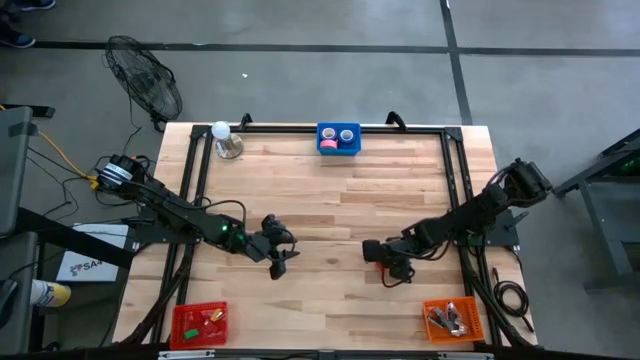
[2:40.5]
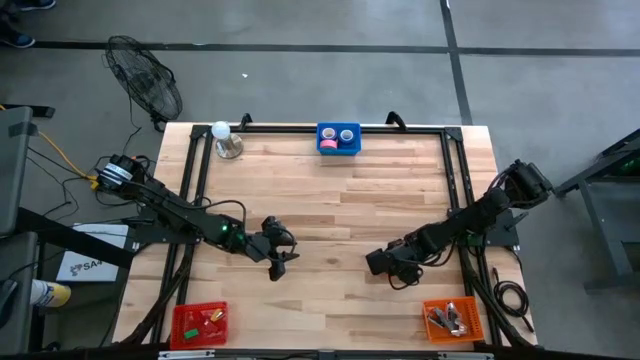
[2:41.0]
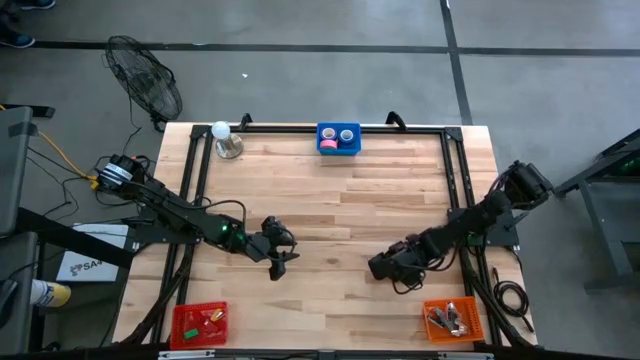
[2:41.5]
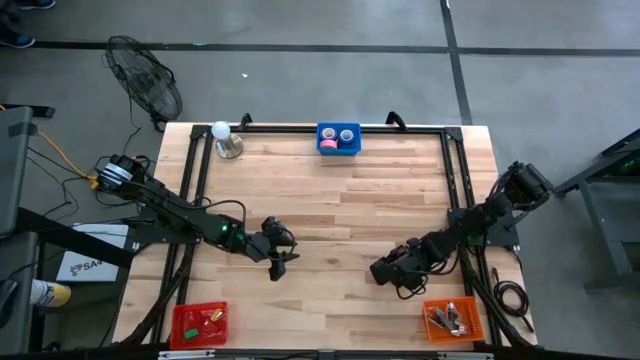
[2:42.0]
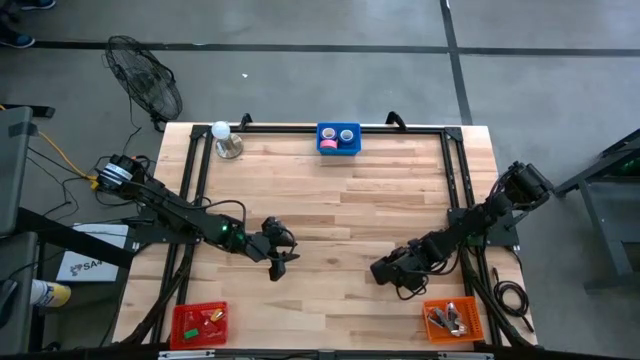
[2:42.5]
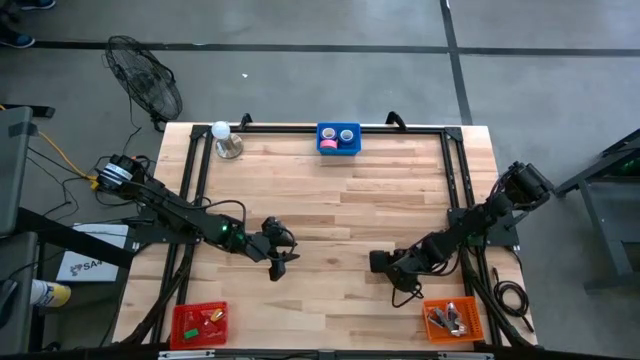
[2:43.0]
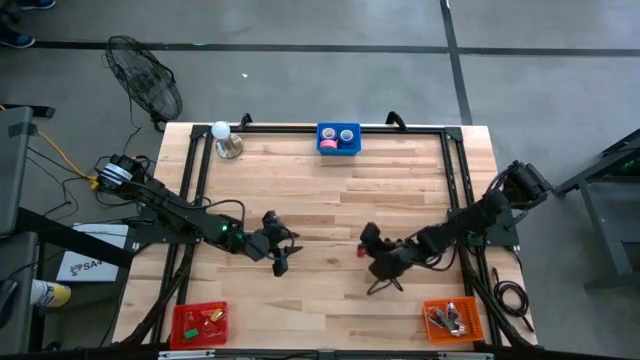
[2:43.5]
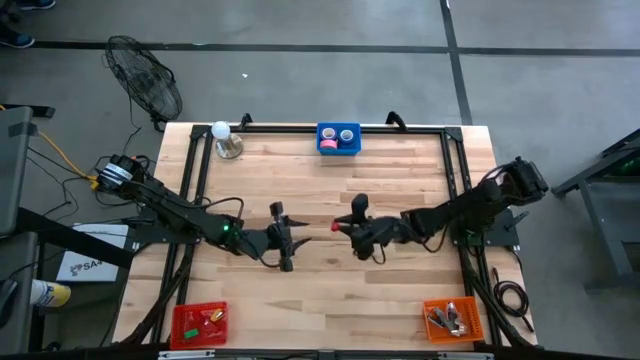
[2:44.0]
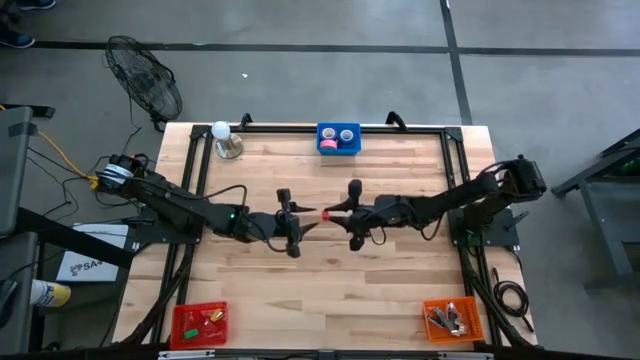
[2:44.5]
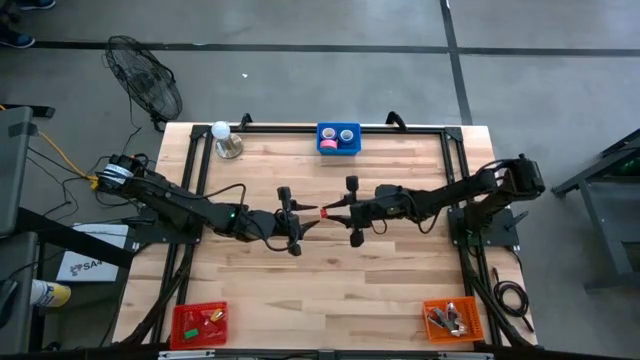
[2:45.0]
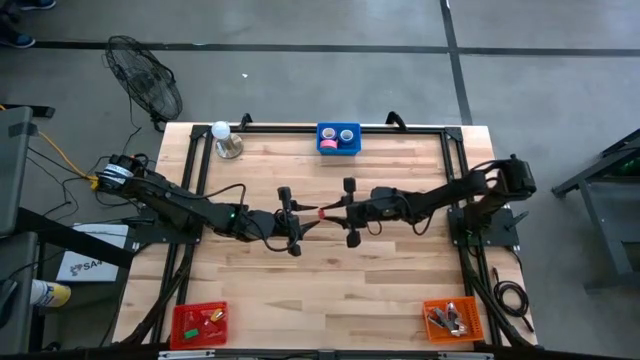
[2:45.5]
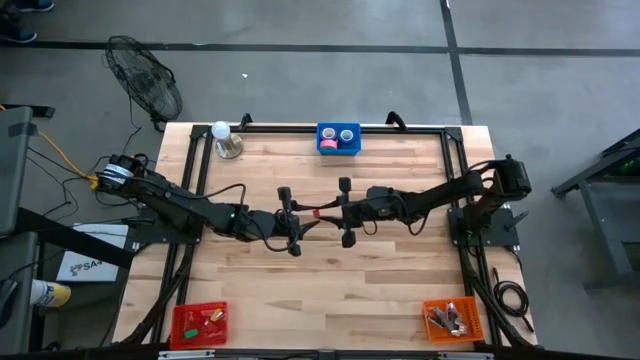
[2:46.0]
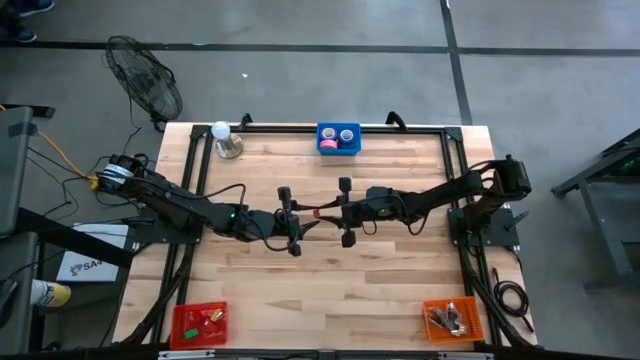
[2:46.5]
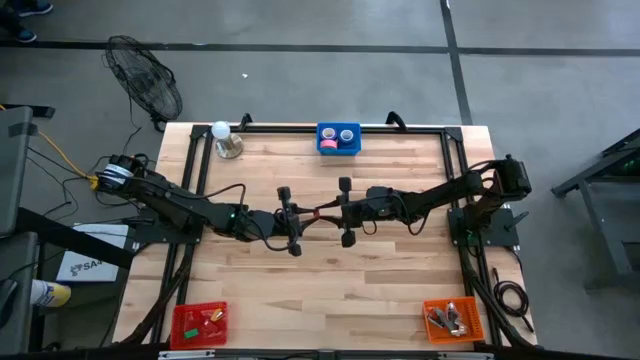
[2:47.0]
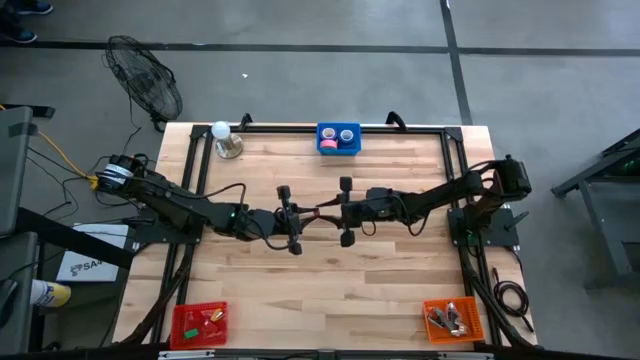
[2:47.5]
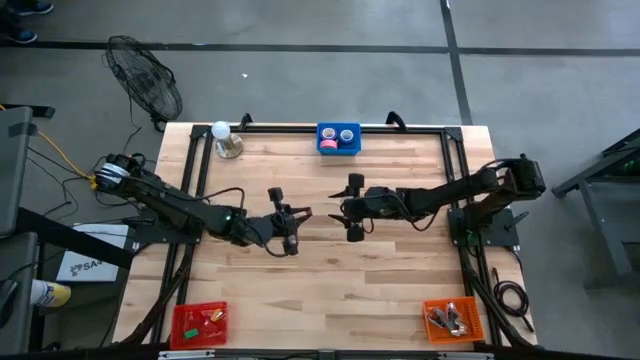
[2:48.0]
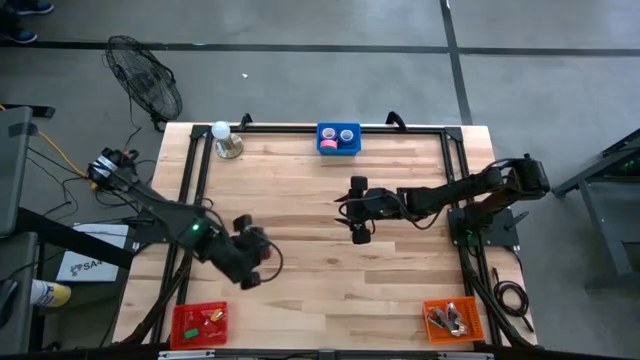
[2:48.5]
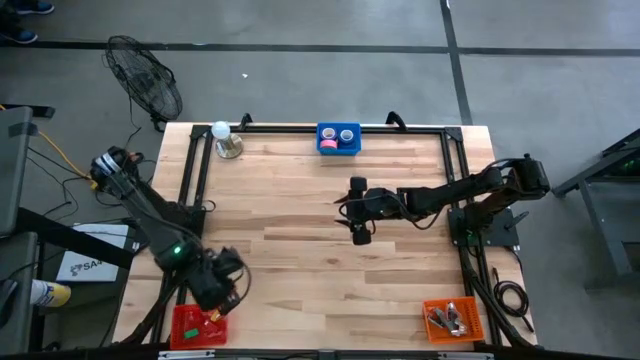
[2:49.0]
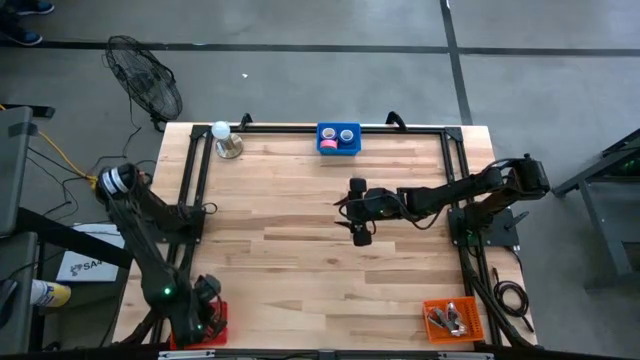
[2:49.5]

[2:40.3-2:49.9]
Task: Pick and place Stapler, Stapler remover, tape
Put the red stapler into the red bin

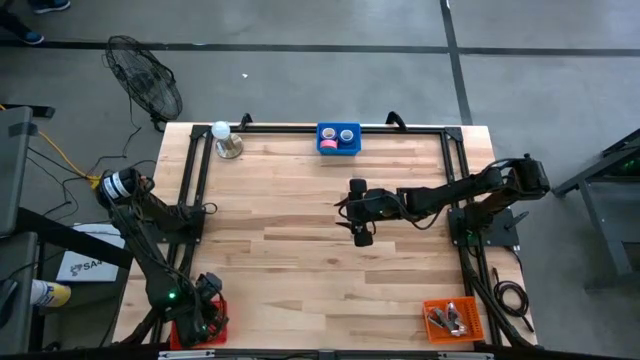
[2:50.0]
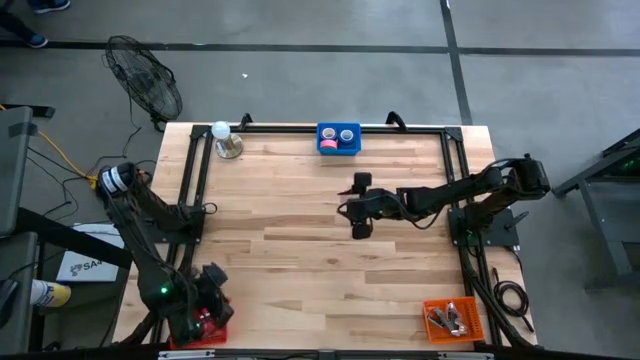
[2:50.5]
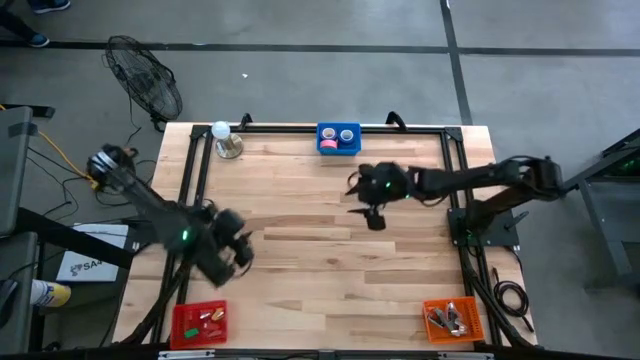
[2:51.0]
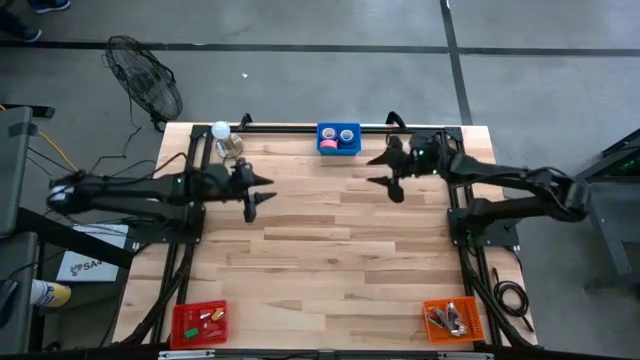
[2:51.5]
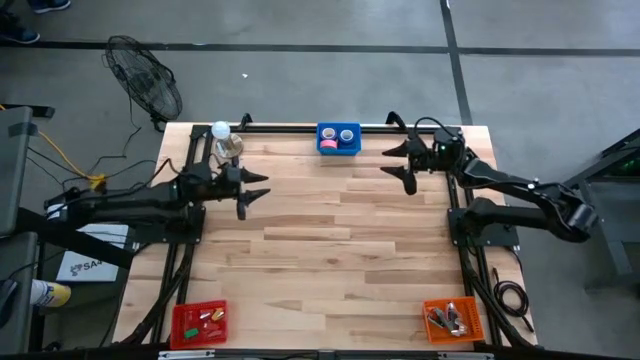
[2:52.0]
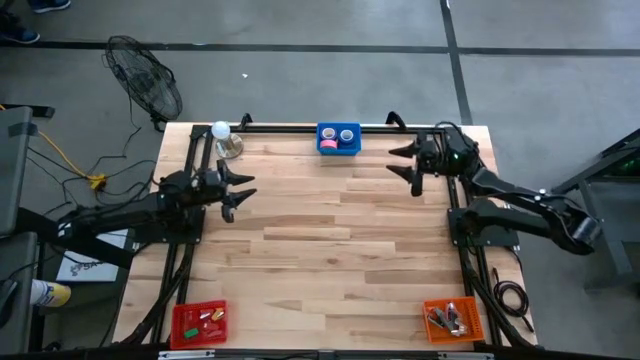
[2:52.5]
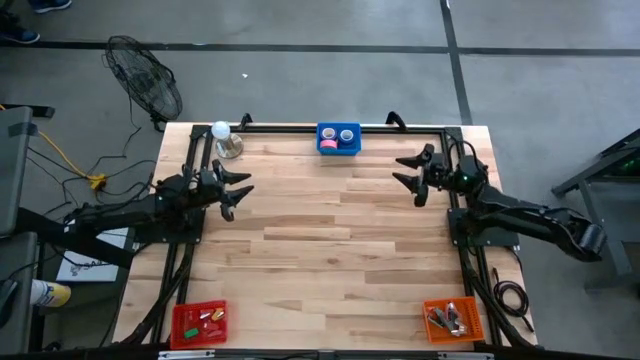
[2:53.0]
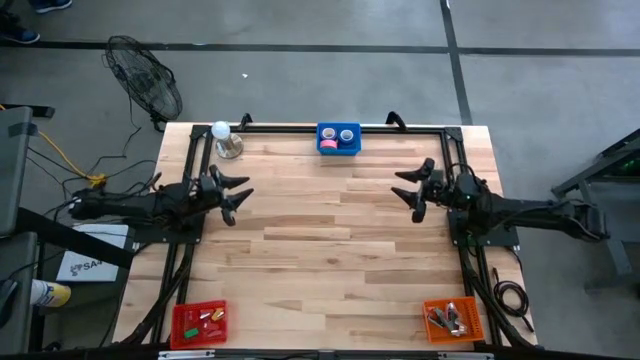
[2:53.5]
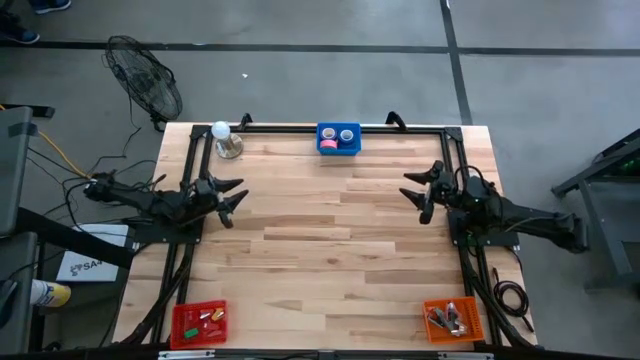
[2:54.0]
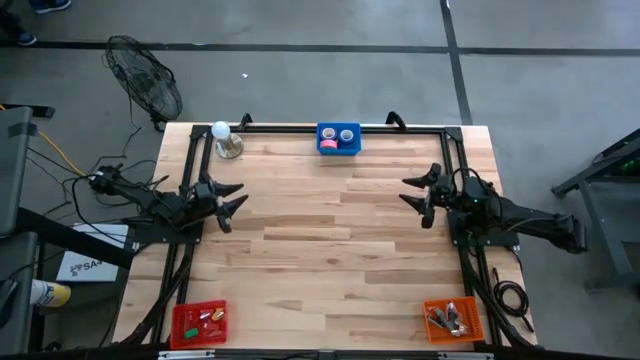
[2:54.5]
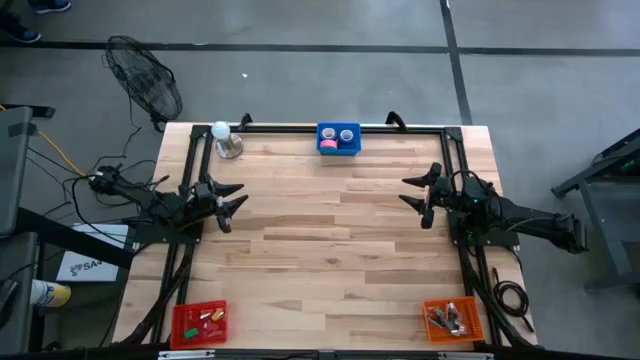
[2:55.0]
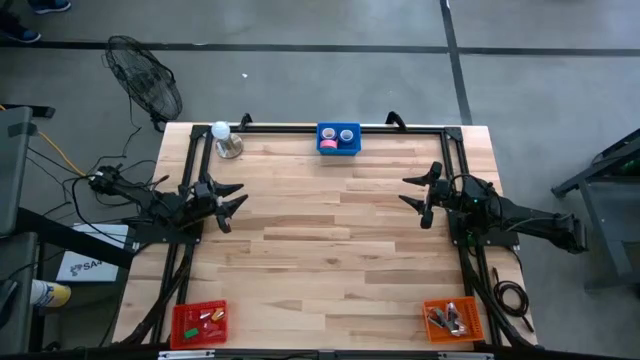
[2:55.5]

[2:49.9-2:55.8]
Return to Home Position

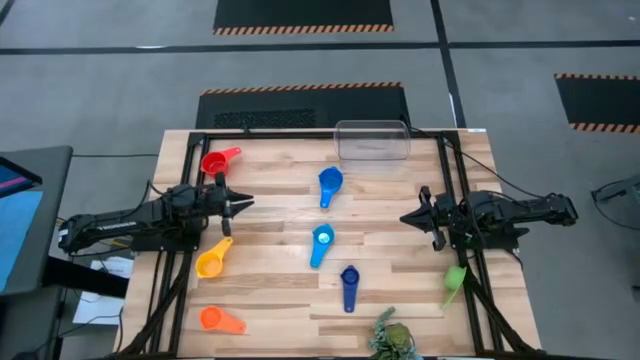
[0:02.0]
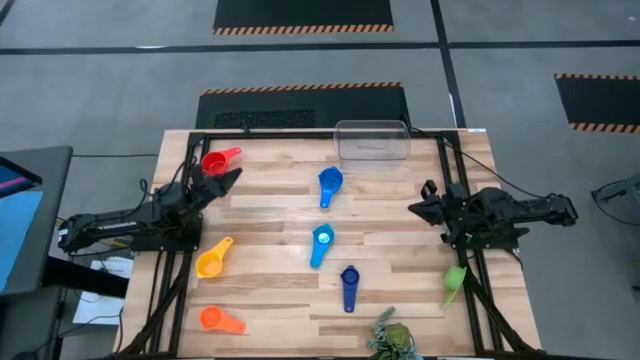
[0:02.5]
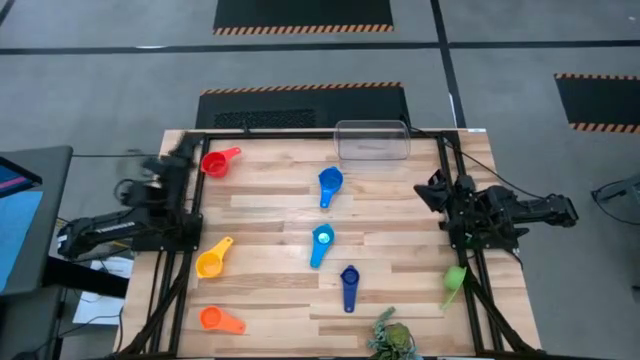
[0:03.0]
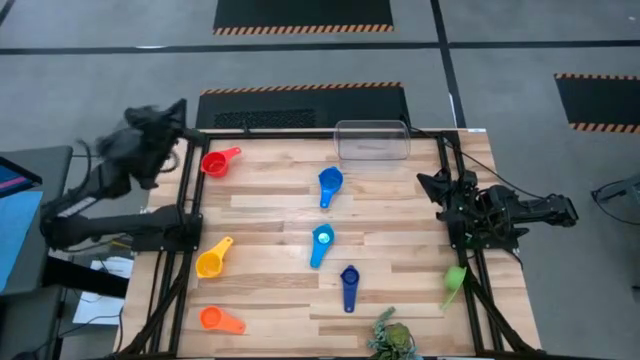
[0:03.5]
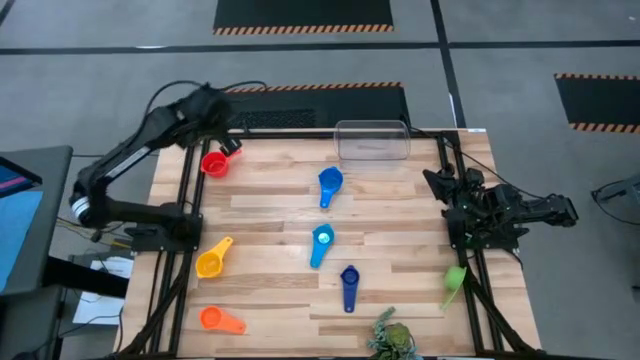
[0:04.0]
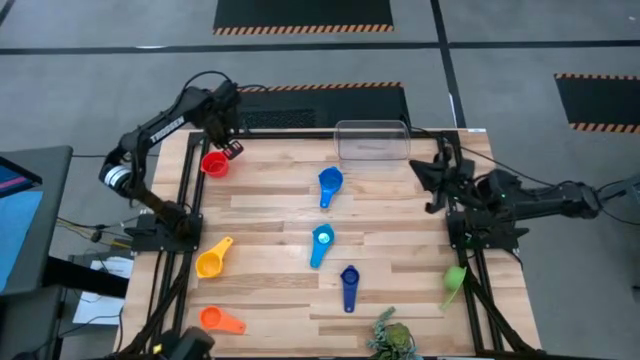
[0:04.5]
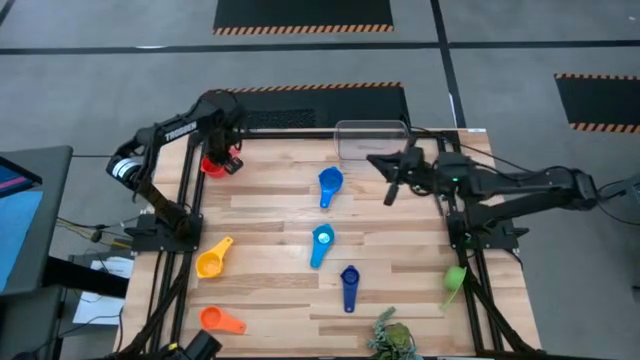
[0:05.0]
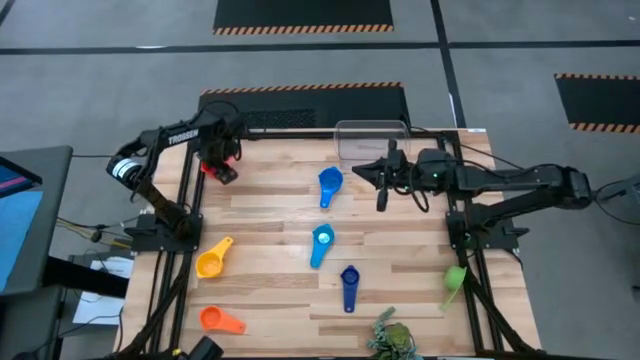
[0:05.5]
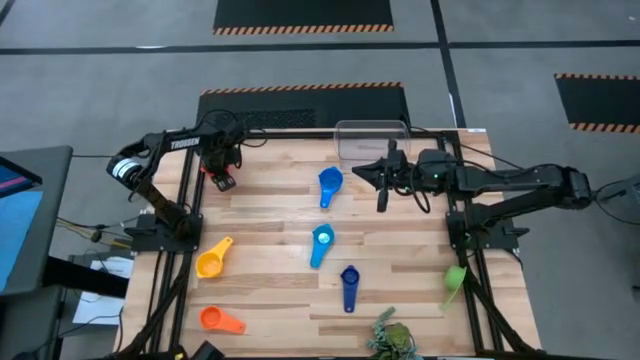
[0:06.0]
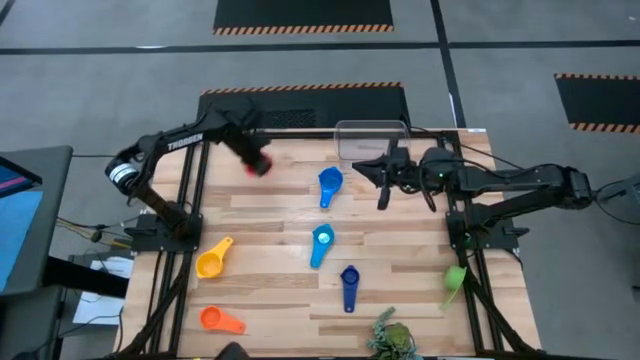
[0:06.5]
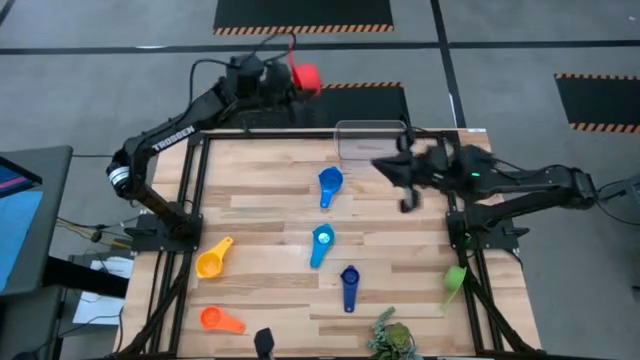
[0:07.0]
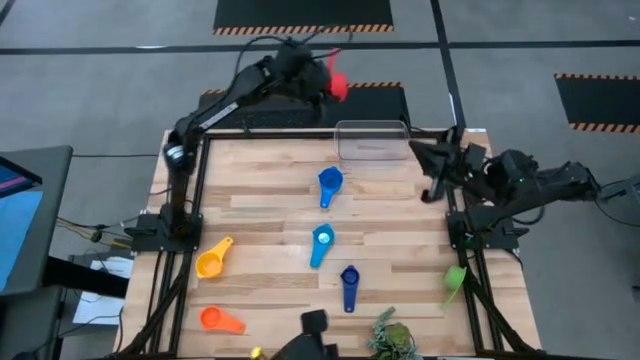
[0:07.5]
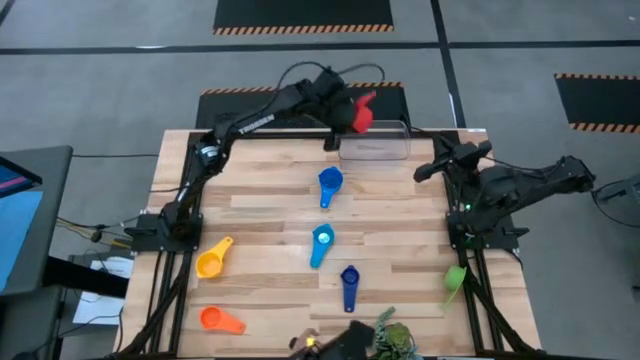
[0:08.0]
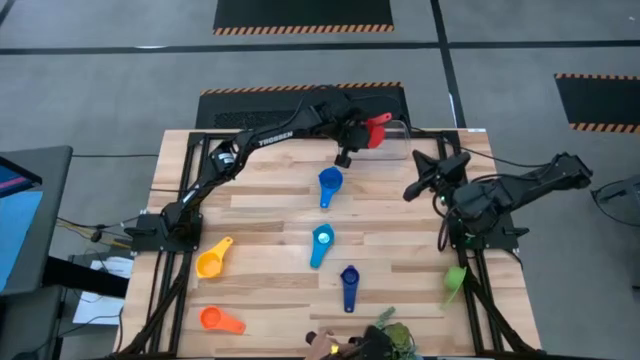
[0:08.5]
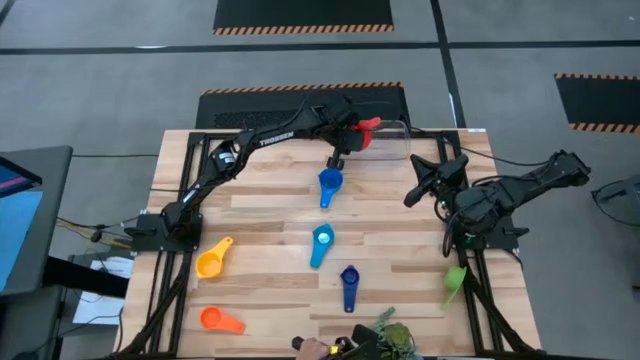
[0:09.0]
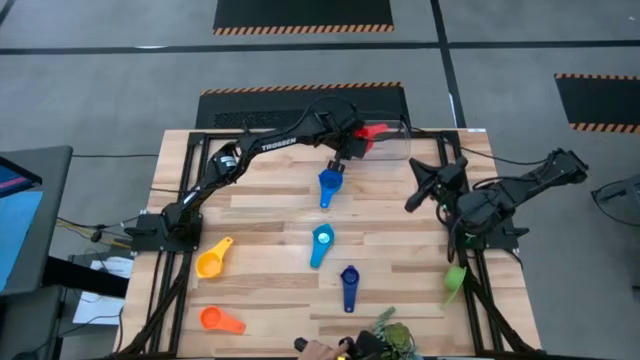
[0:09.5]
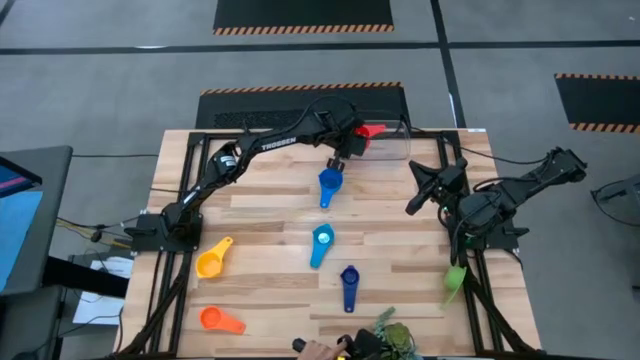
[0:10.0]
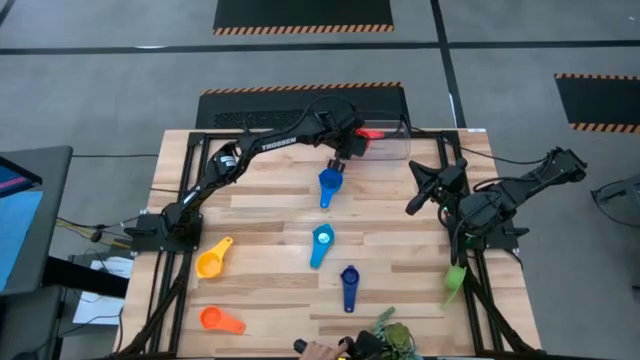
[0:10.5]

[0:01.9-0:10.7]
Task: Nest measuring cups in basket
Put the red measuring cup into the transparent bin
